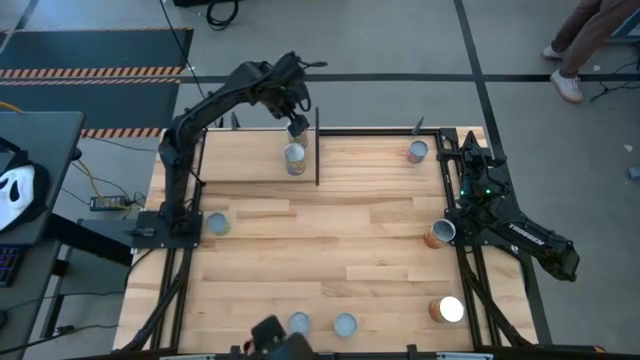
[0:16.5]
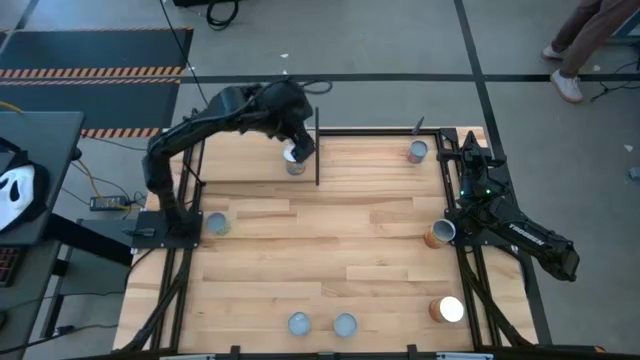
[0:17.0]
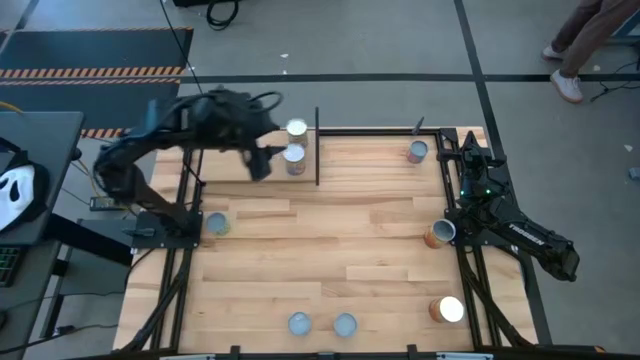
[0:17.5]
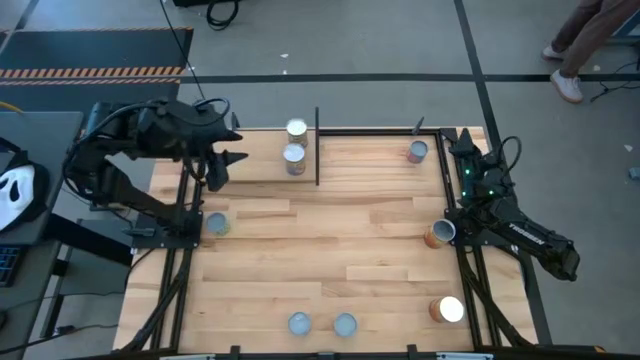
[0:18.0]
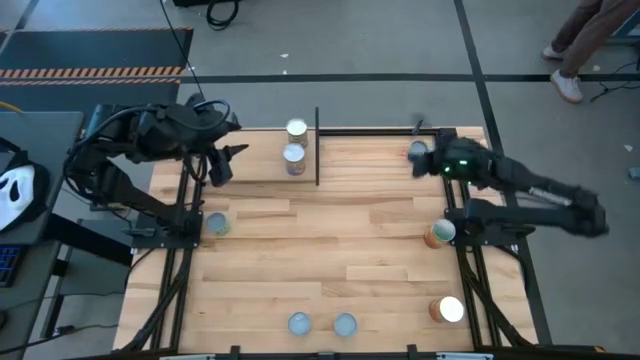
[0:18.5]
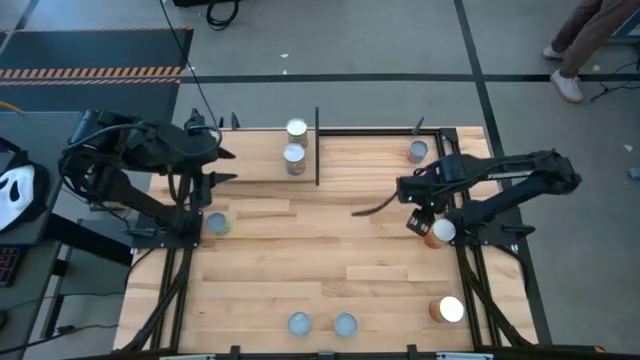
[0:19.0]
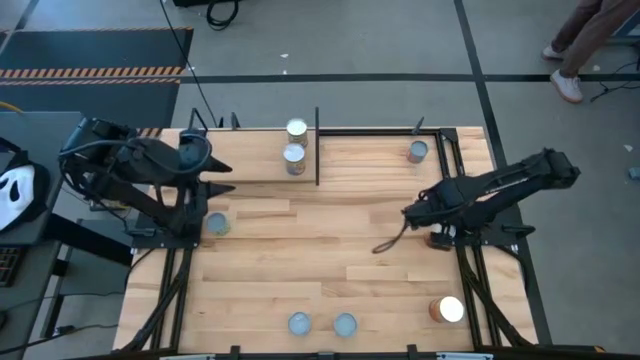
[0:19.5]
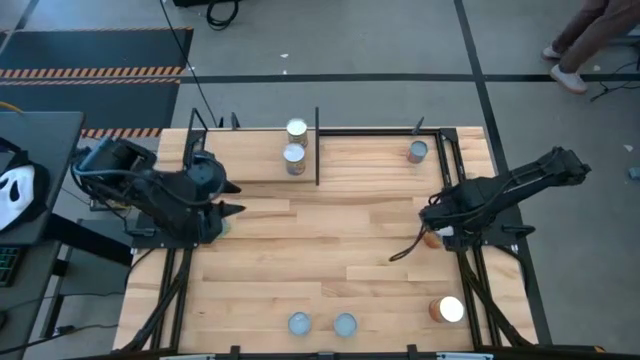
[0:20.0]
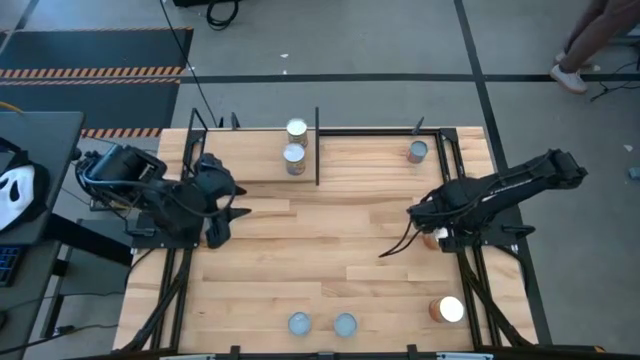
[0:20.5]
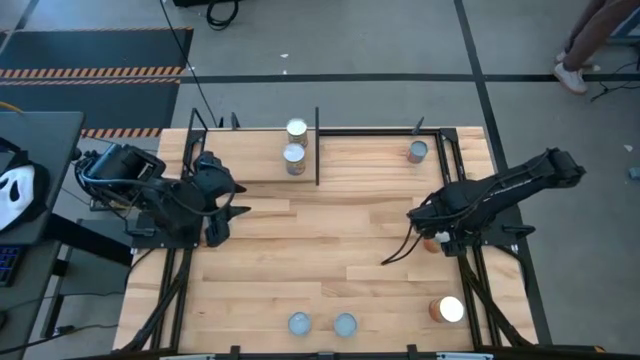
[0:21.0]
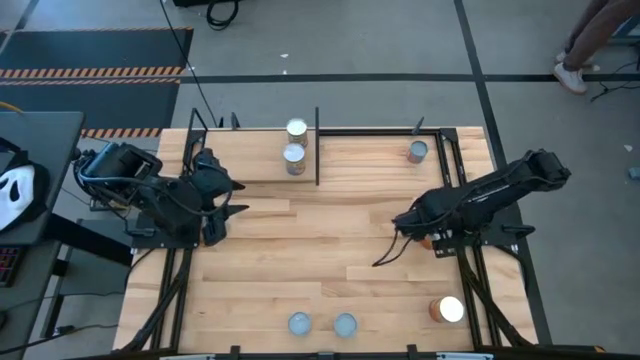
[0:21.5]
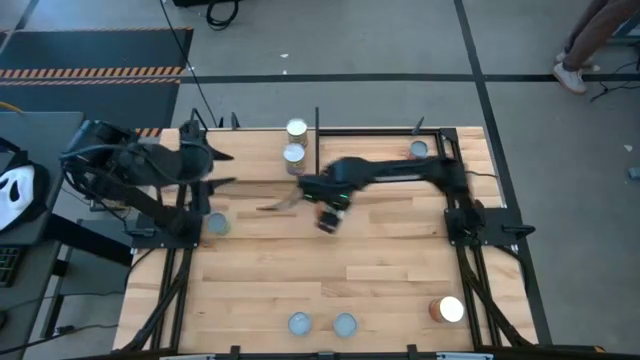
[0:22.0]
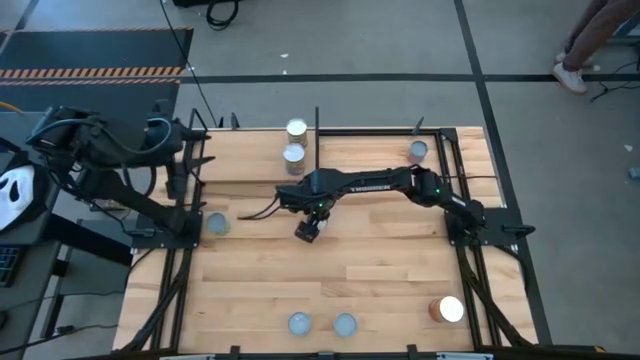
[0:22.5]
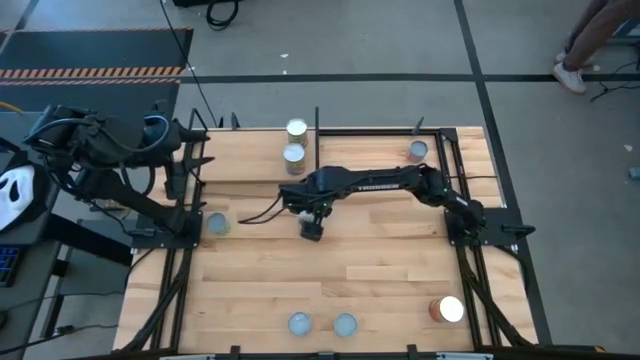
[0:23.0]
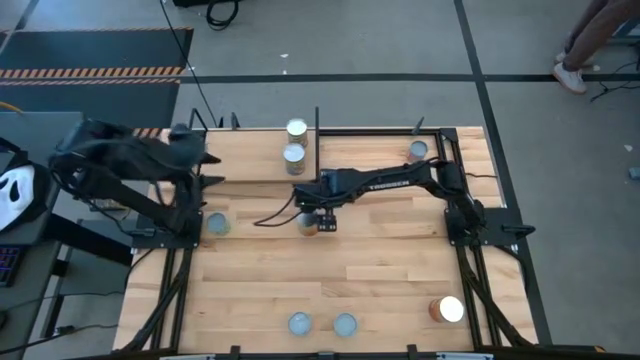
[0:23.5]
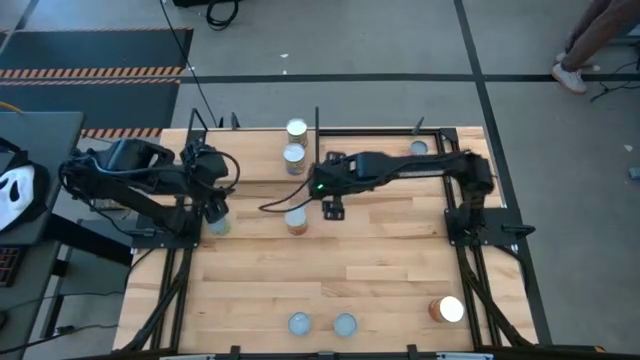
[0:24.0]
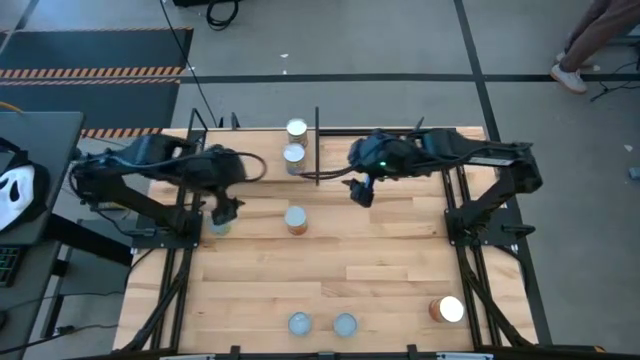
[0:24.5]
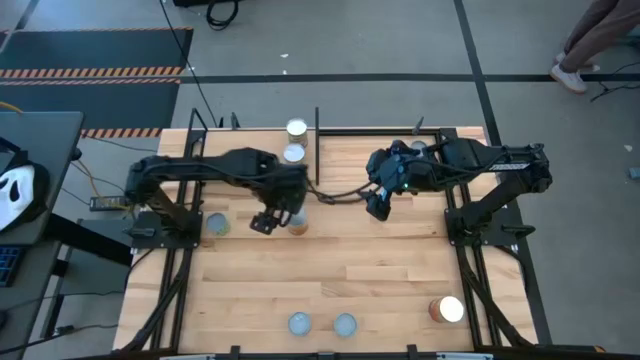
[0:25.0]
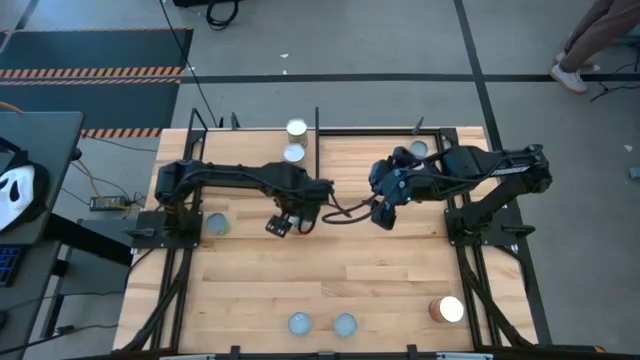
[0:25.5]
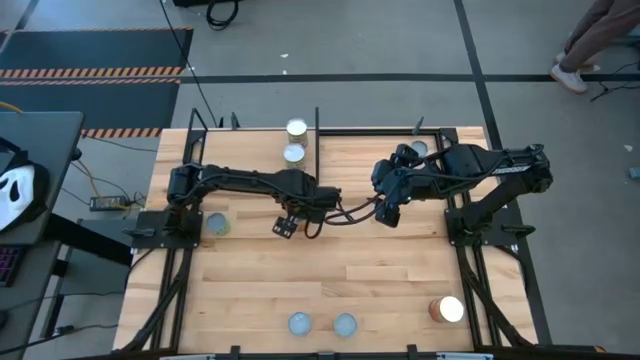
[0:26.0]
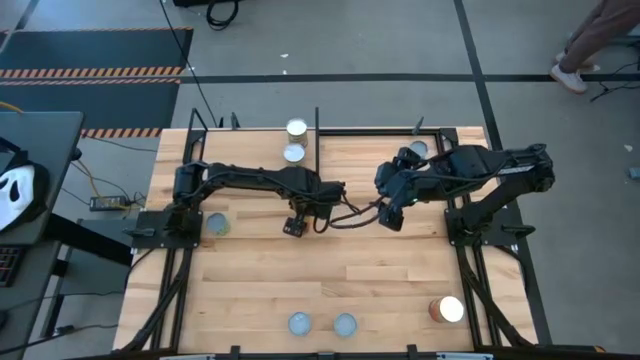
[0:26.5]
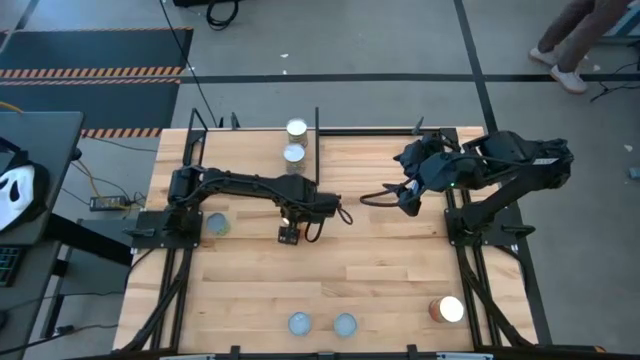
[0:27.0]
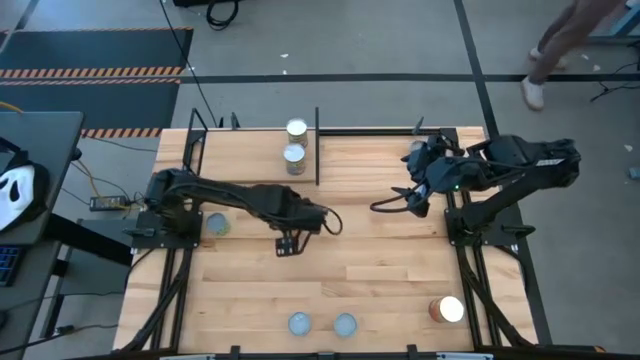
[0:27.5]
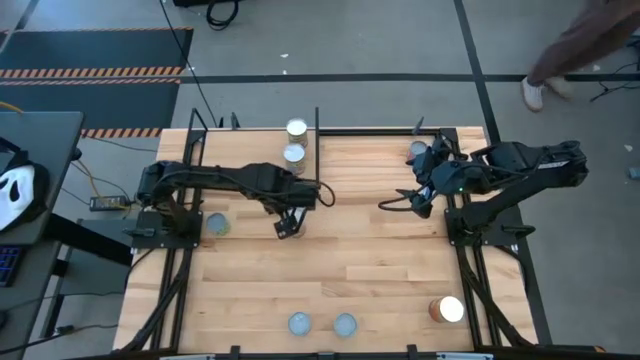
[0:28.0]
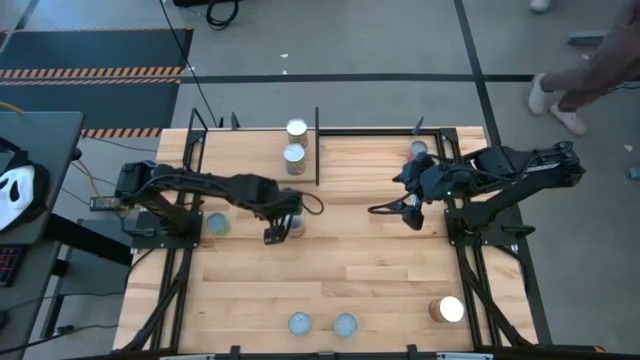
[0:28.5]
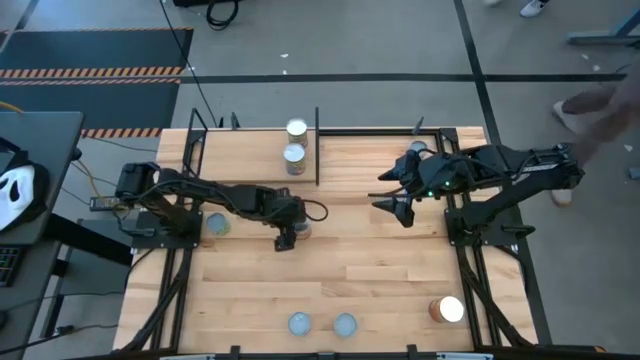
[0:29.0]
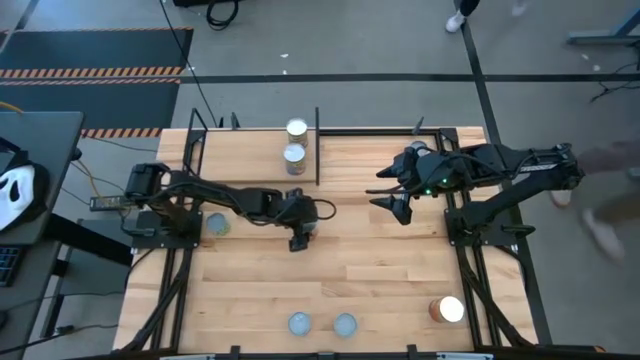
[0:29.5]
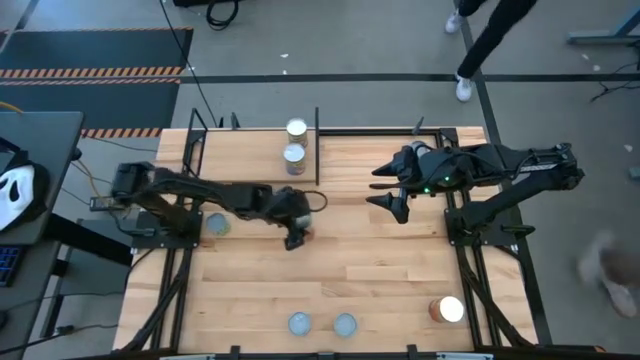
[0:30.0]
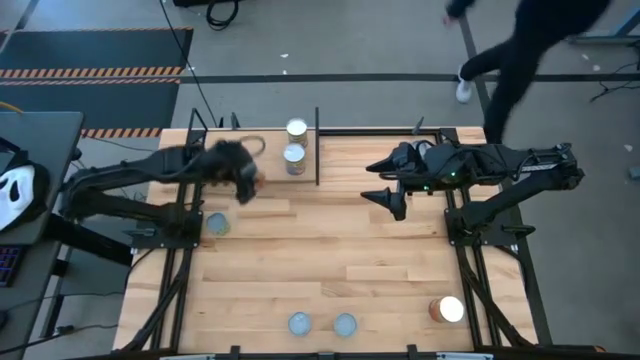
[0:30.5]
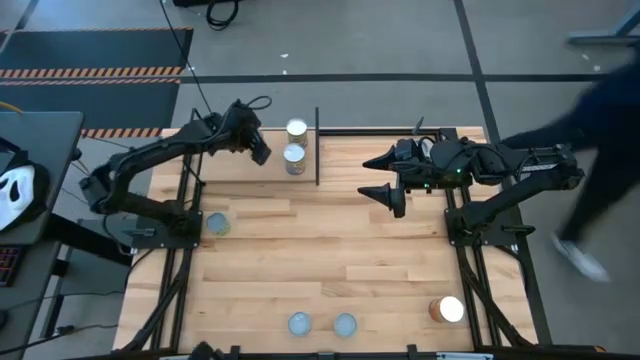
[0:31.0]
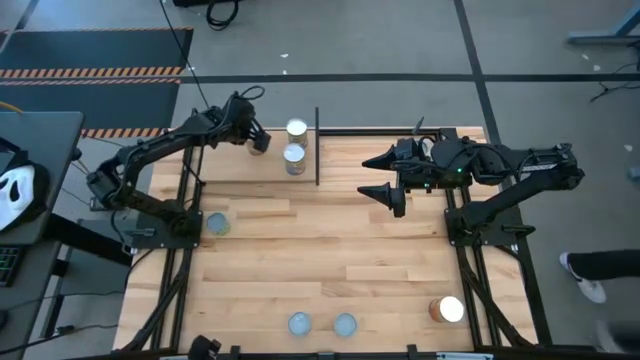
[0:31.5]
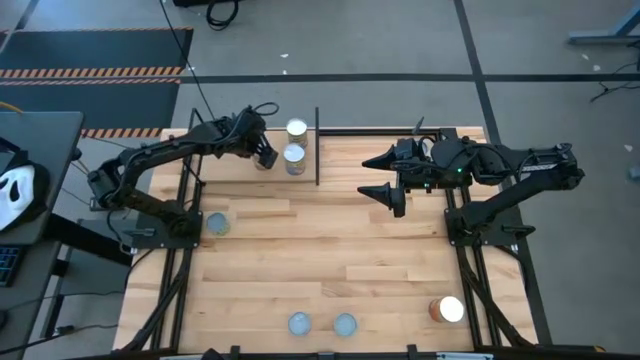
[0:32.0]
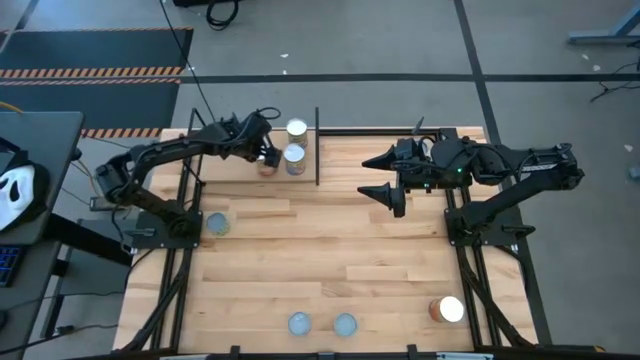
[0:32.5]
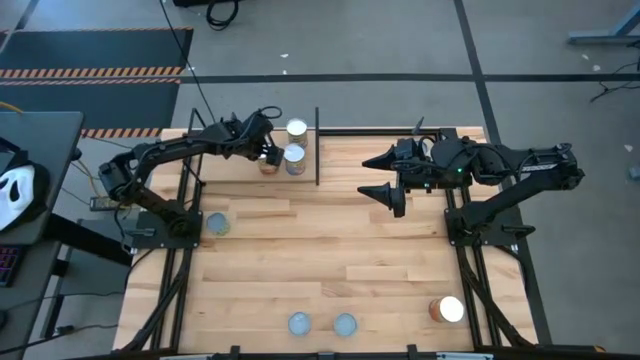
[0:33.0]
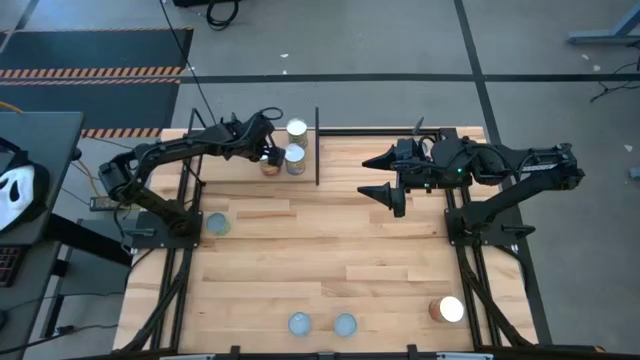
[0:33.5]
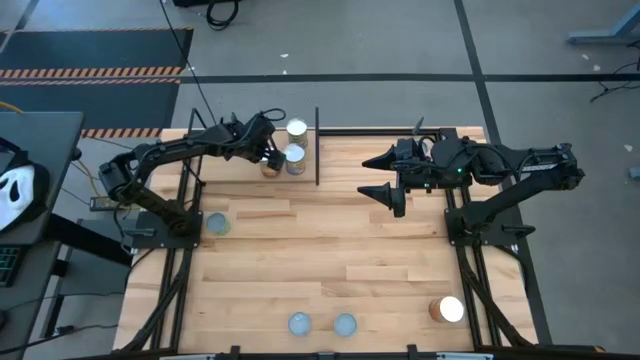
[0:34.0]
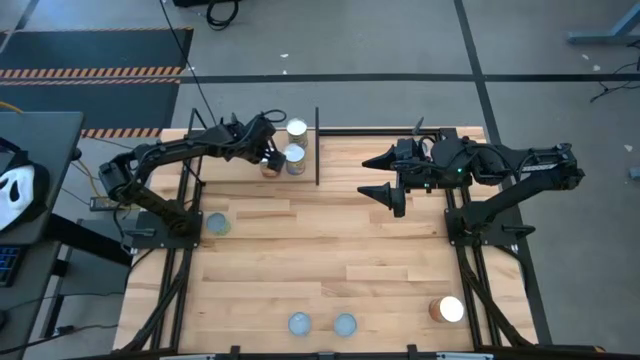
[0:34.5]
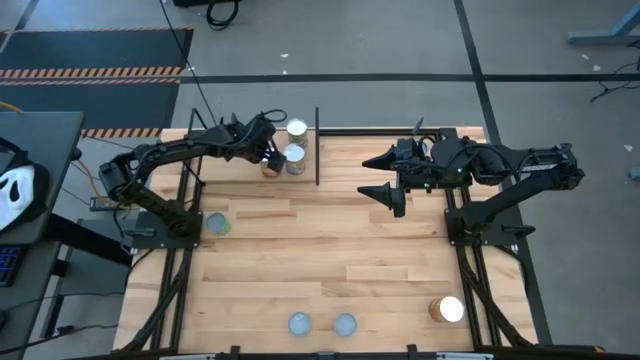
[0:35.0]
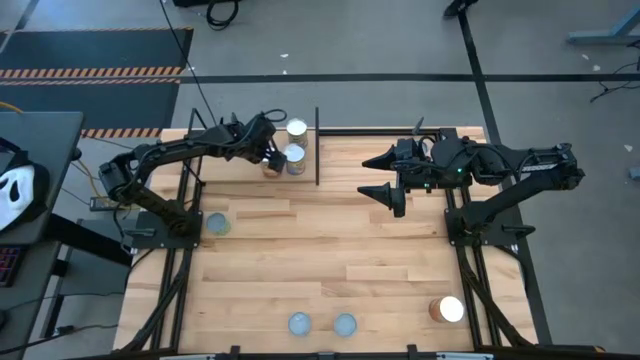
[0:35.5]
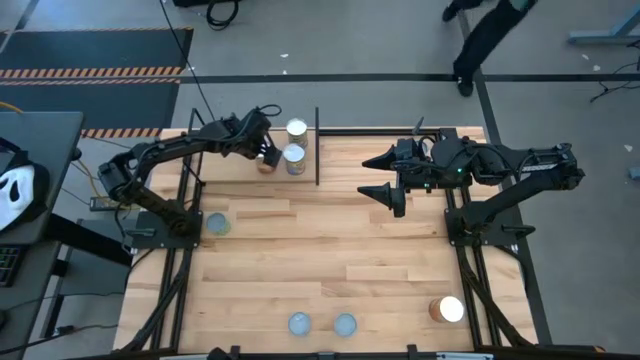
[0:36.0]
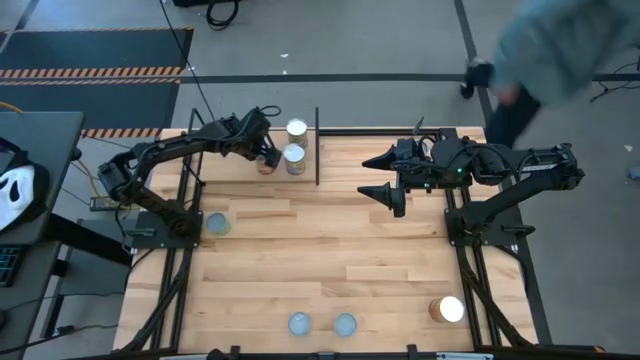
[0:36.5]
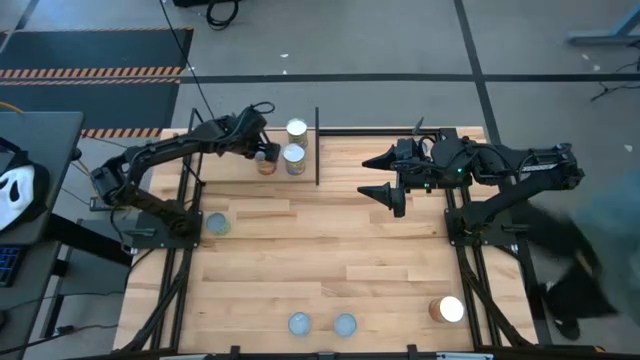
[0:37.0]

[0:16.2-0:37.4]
Task: Pick and place cans onto a shelf
Put the top can of corn on the shelf
